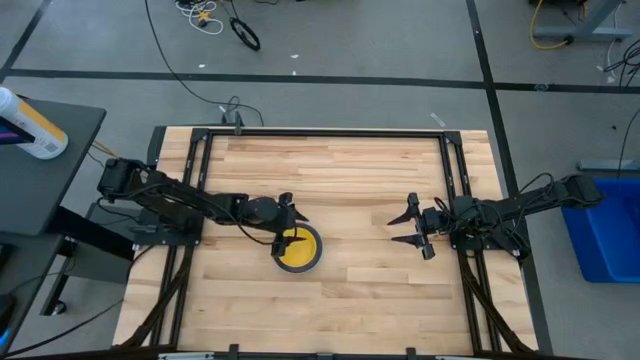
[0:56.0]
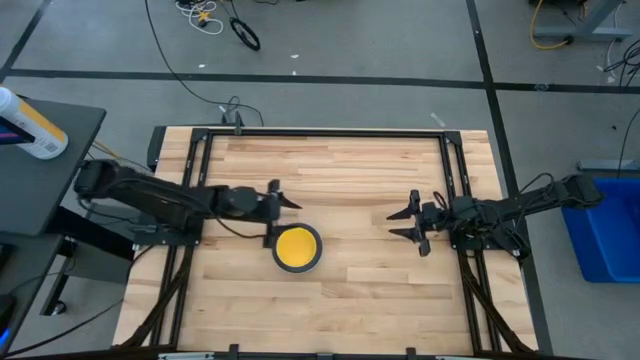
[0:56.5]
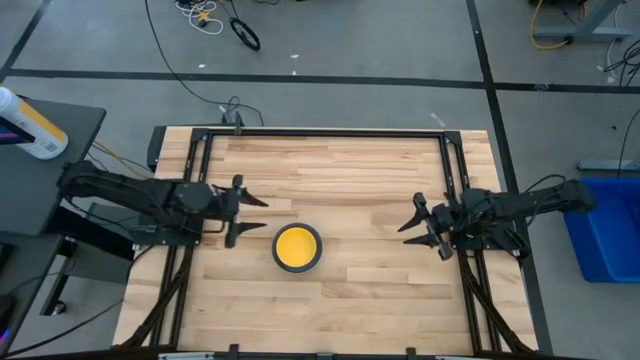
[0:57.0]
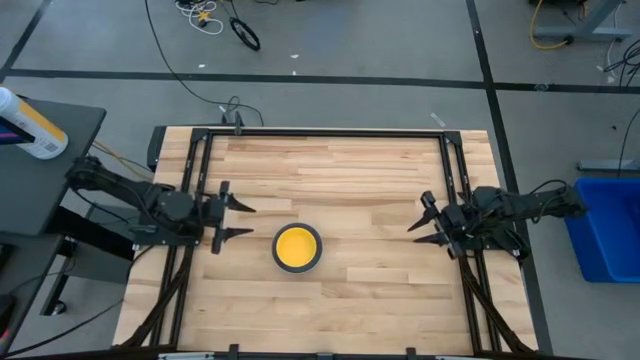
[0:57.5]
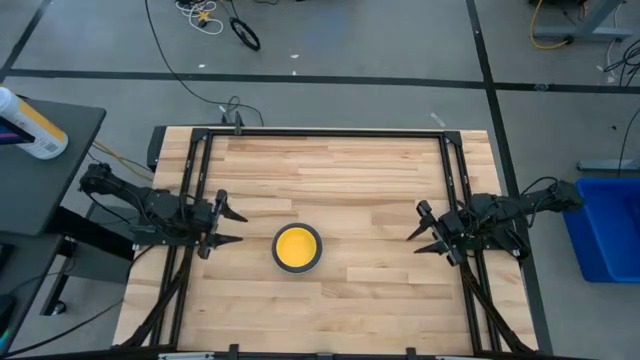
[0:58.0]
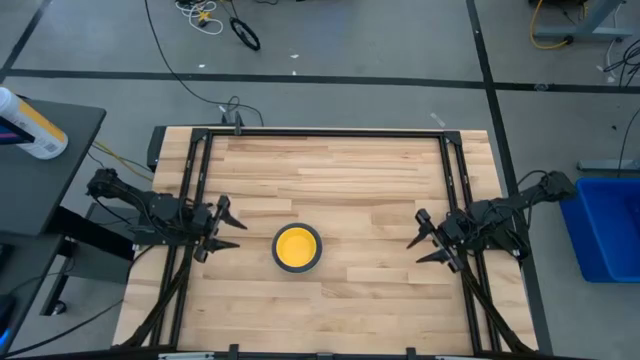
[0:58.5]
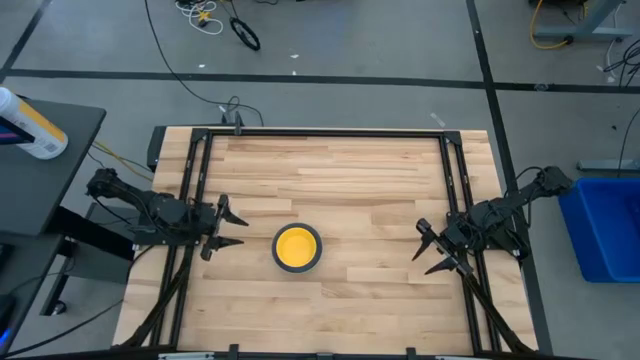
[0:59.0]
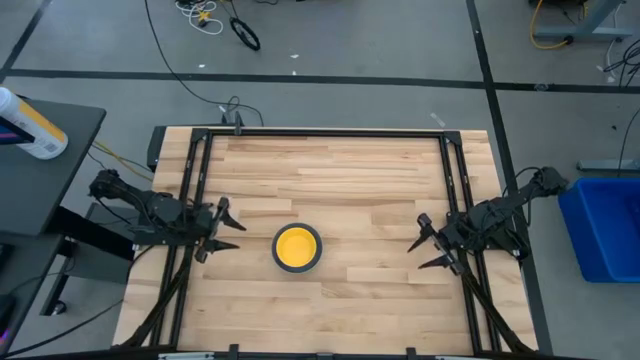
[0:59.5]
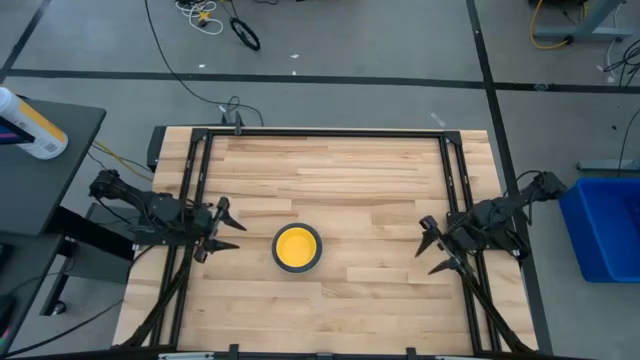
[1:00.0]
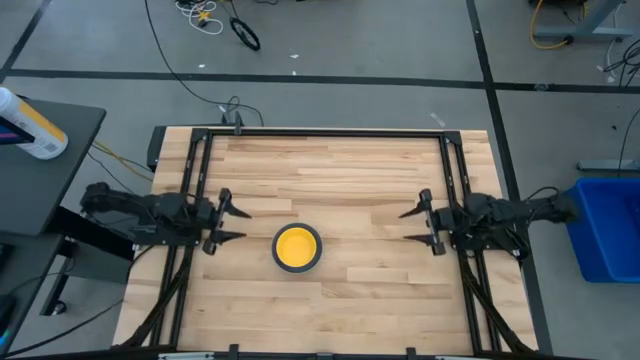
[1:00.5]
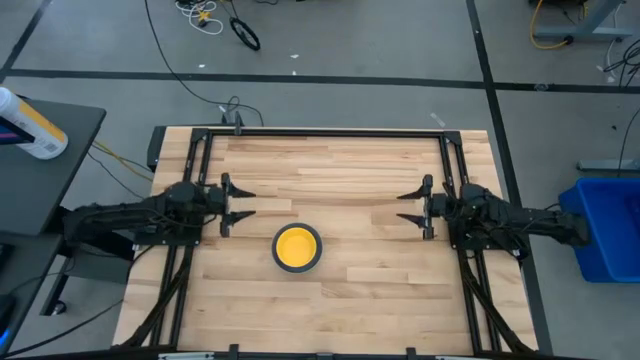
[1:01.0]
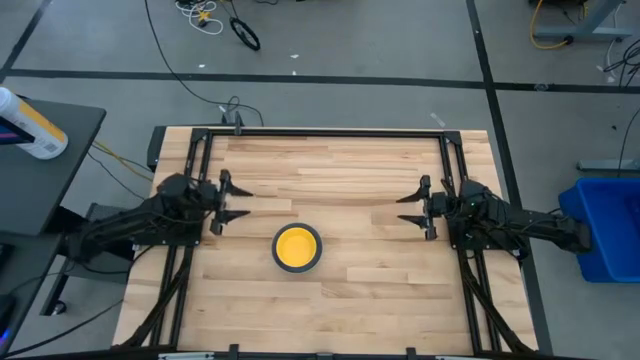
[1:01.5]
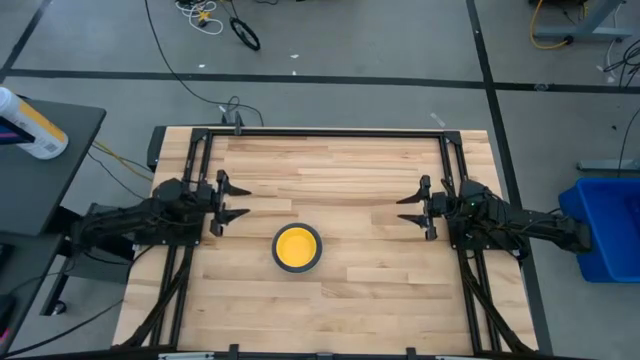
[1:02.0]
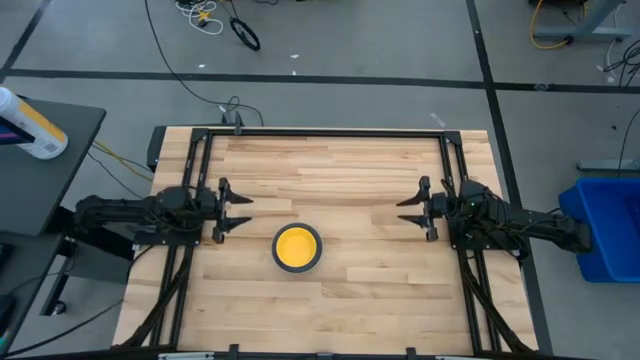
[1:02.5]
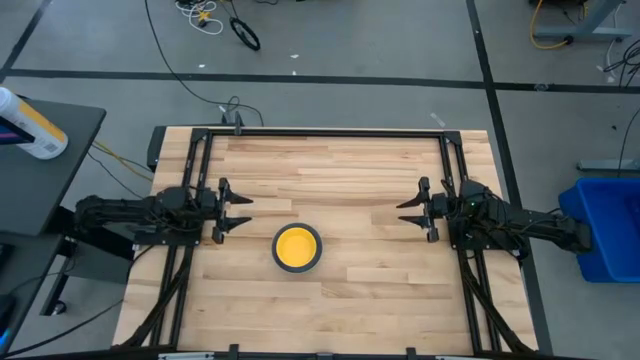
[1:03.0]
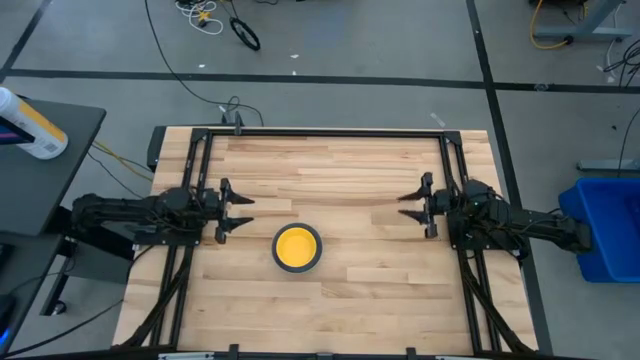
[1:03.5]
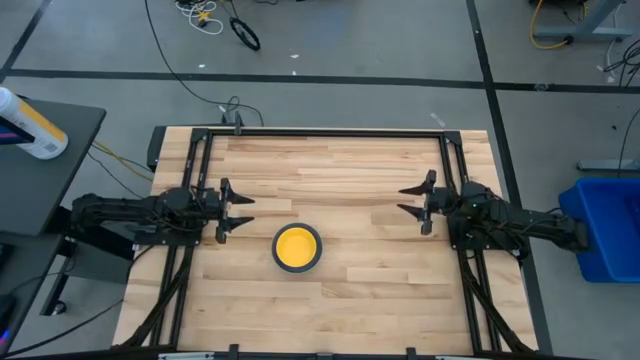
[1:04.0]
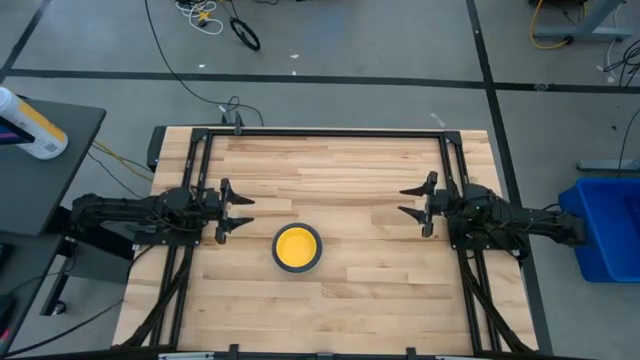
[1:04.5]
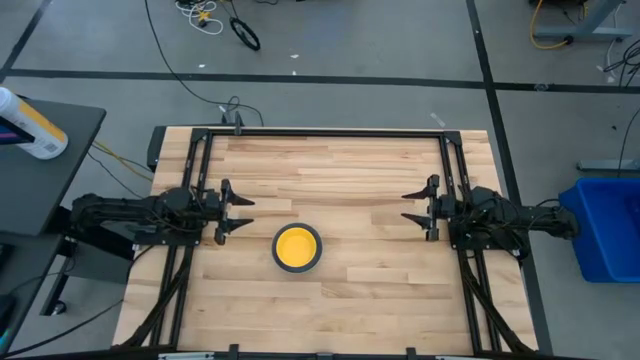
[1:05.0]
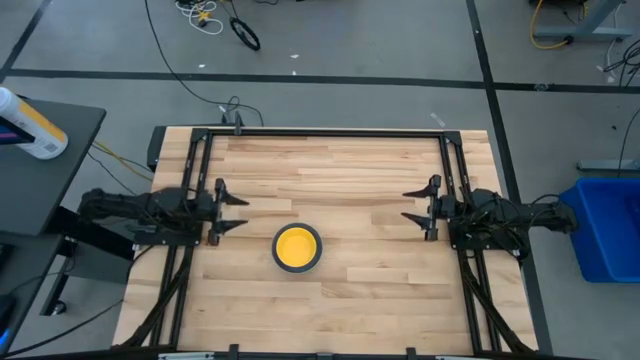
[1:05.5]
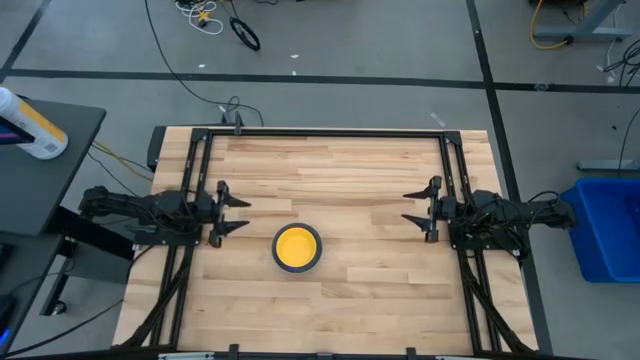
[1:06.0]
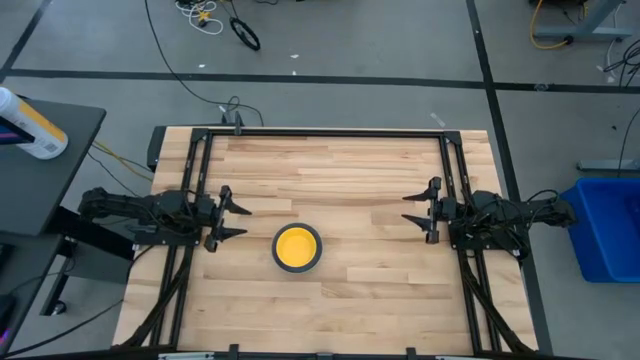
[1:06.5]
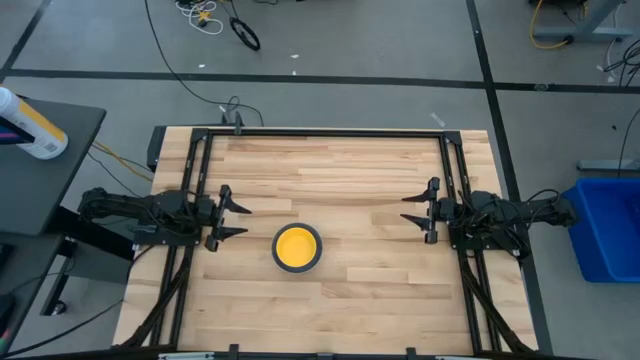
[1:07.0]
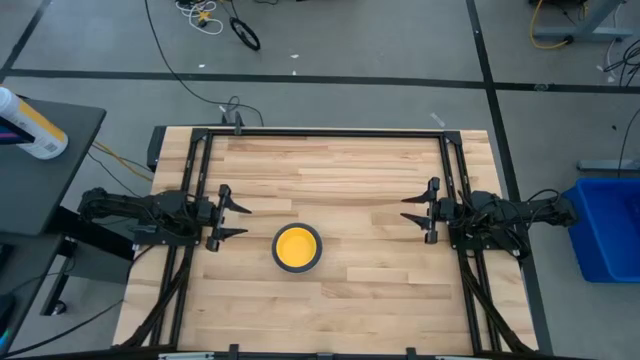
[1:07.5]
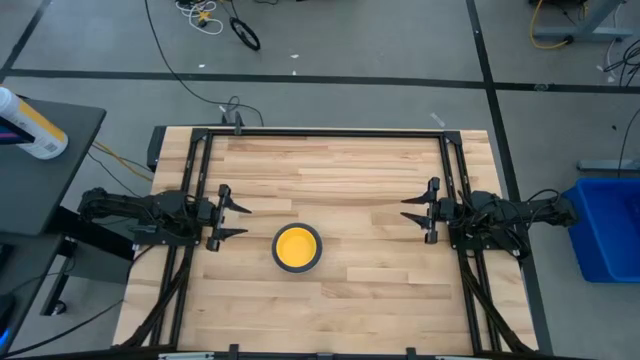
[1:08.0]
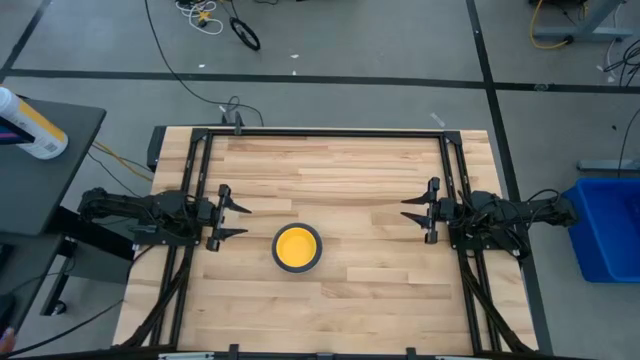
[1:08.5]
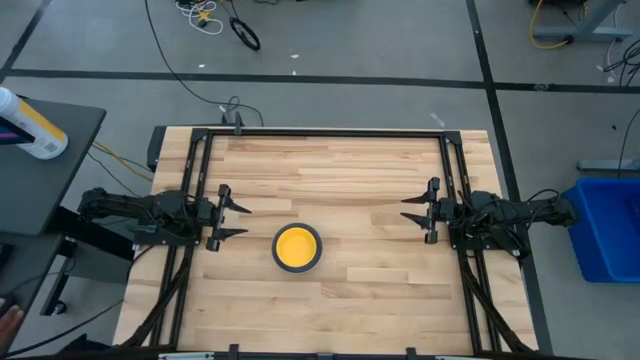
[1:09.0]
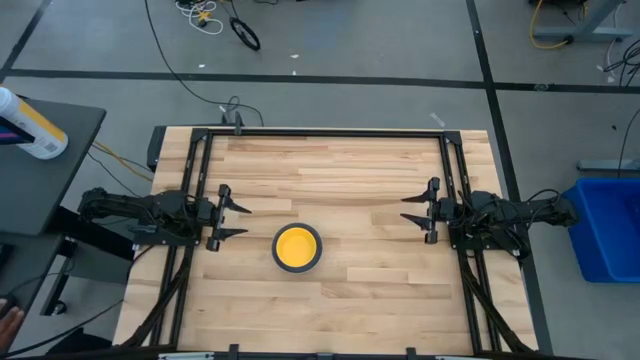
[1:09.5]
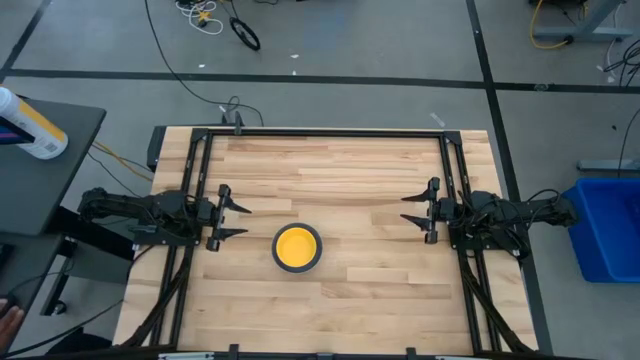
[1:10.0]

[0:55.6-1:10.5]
Return to Home Position

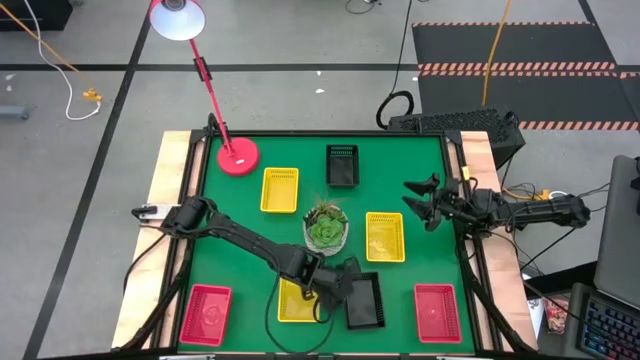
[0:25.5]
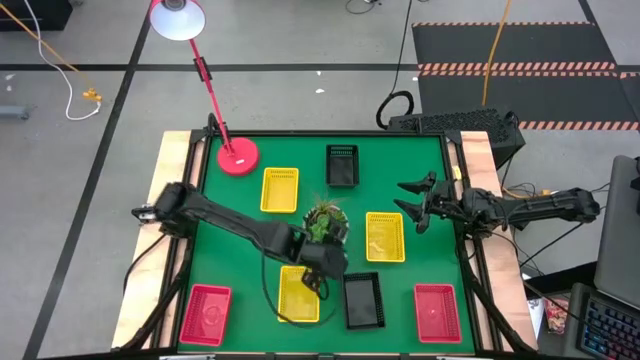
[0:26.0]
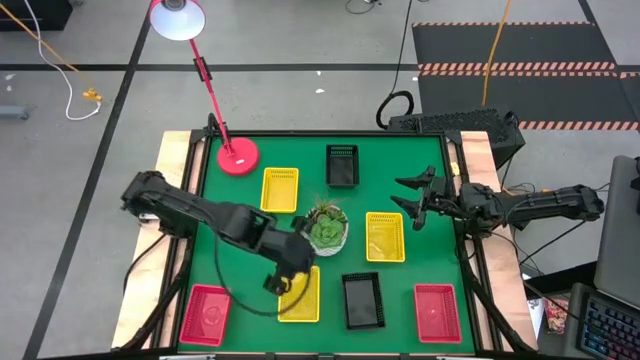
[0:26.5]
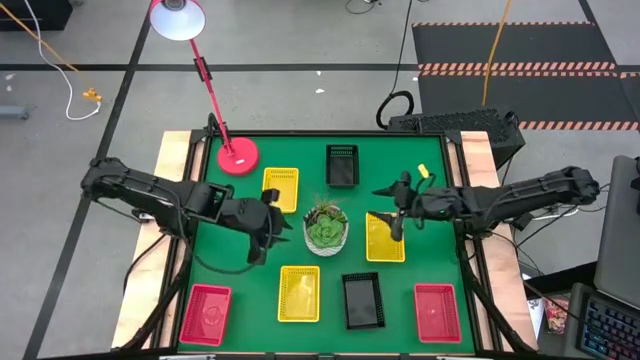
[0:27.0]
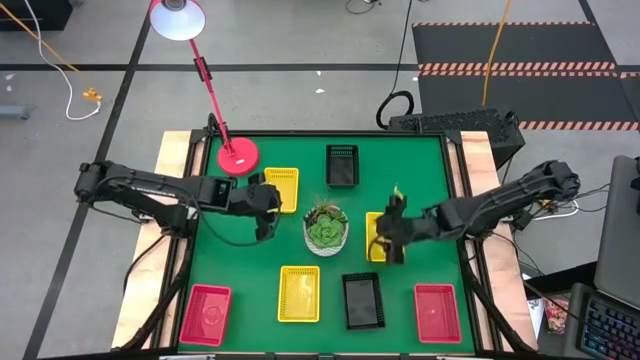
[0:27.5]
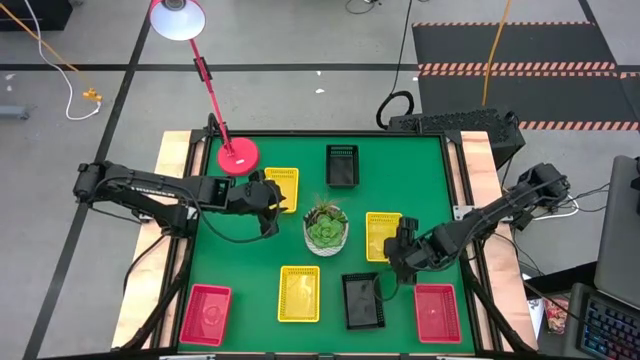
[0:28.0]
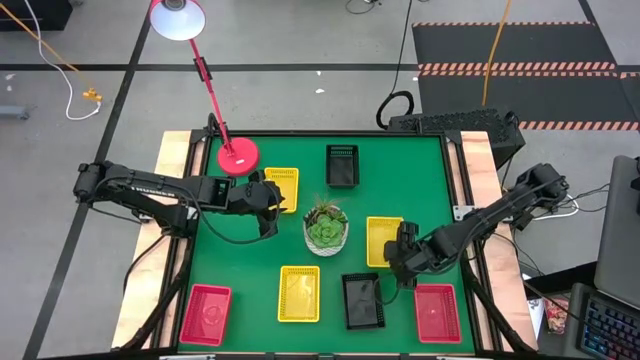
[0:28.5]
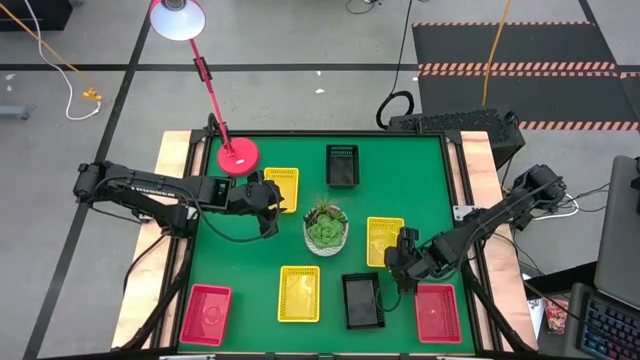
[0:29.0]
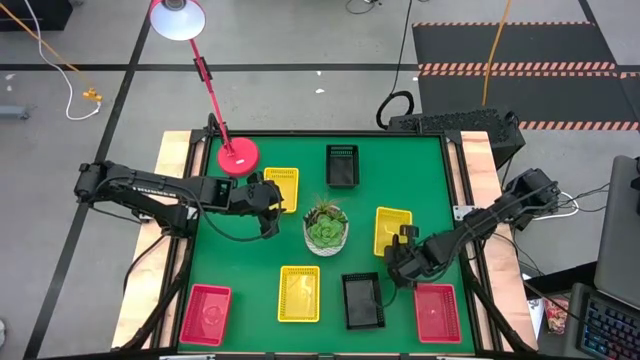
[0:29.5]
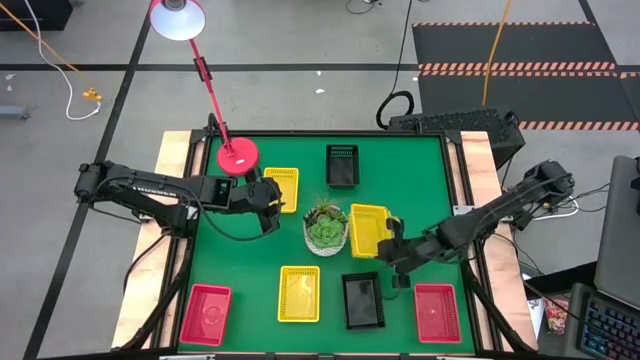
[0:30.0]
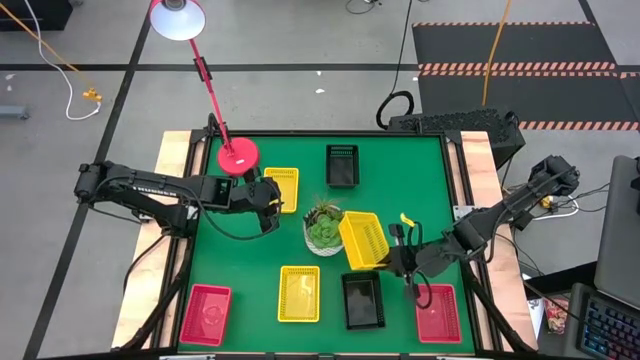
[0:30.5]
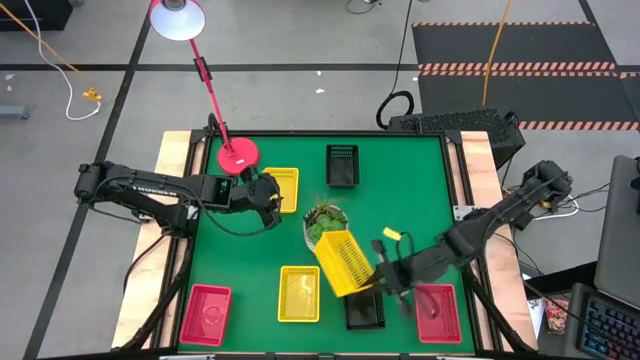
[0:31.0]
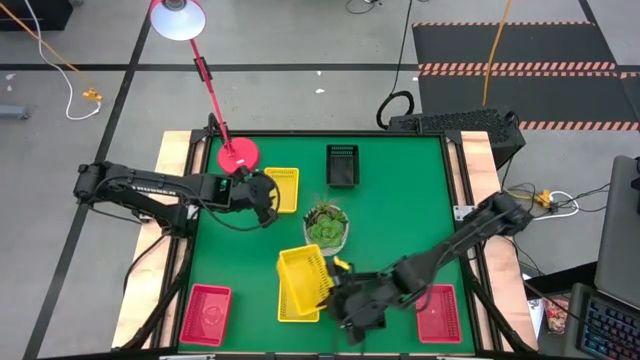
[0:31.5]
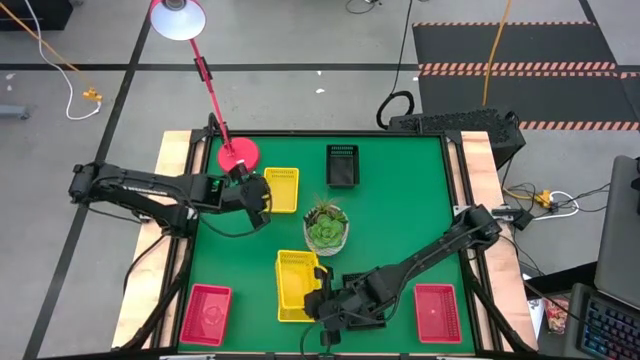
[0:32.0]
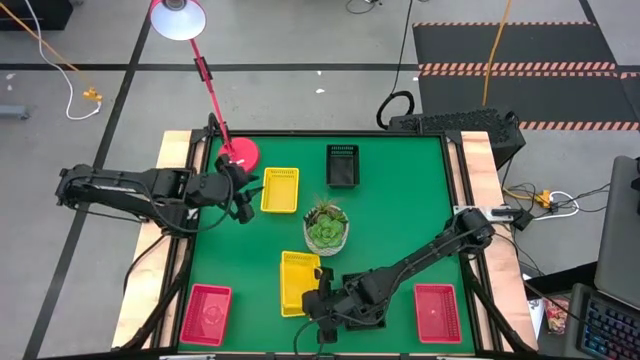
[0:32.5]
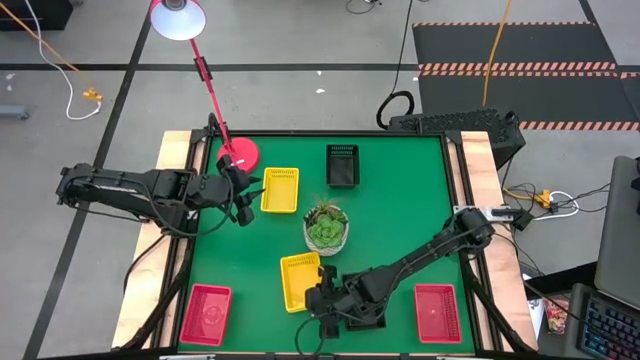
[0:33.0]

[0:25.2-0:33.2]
Stack the middle yellow bin on top of the bottom yellow bin
